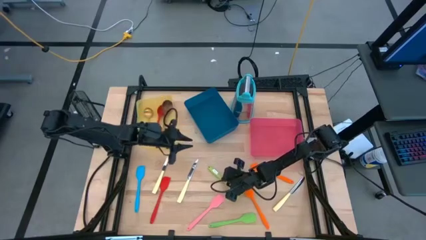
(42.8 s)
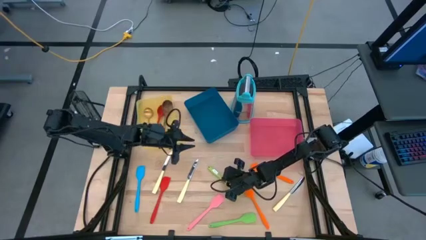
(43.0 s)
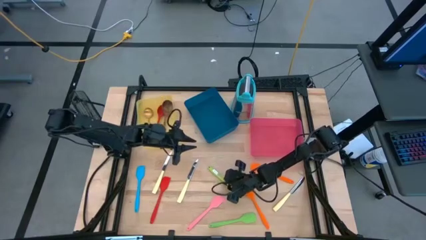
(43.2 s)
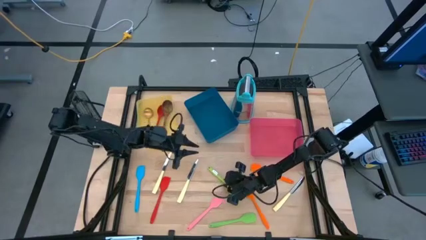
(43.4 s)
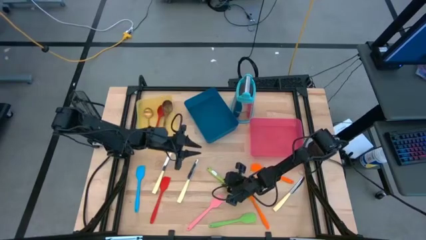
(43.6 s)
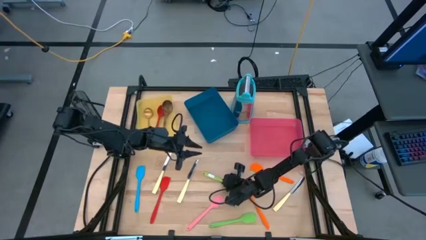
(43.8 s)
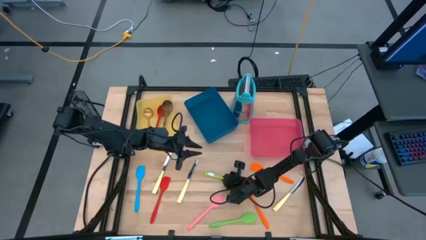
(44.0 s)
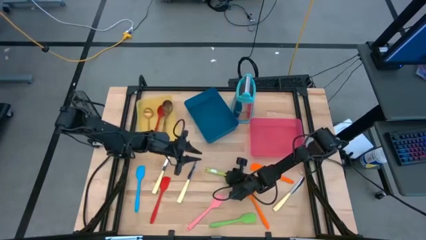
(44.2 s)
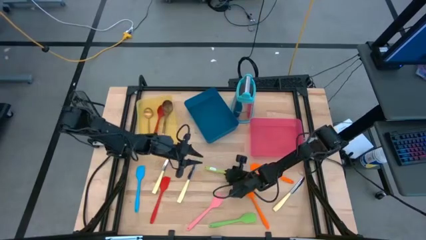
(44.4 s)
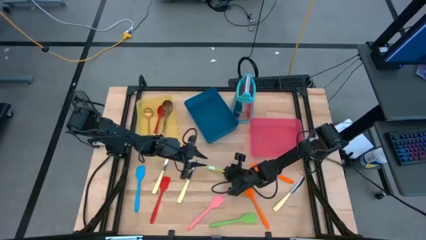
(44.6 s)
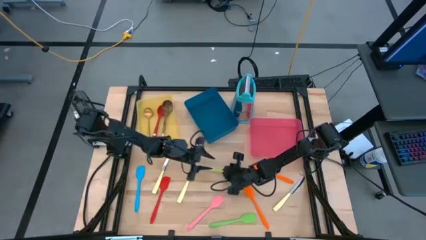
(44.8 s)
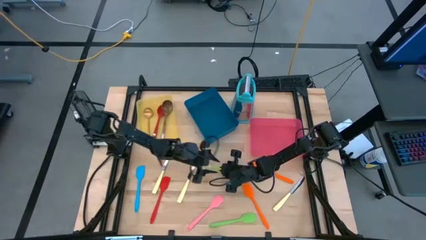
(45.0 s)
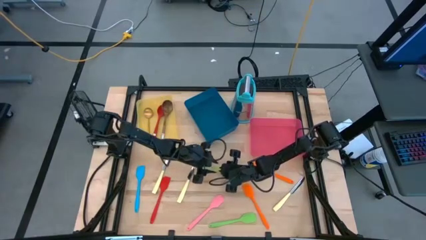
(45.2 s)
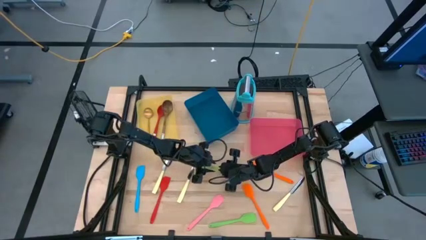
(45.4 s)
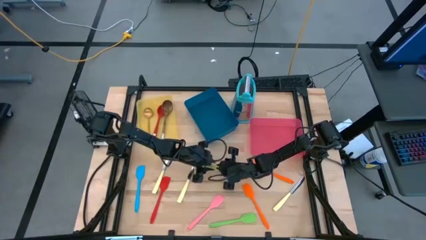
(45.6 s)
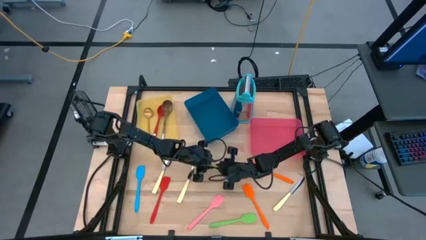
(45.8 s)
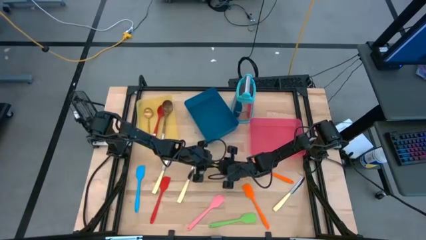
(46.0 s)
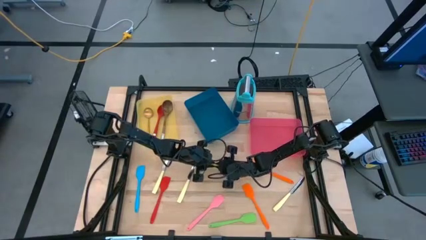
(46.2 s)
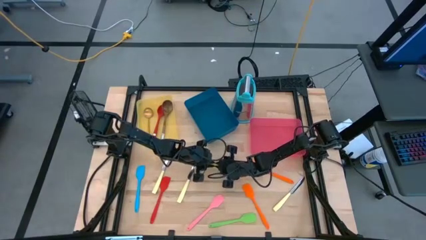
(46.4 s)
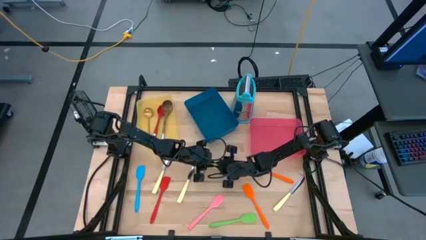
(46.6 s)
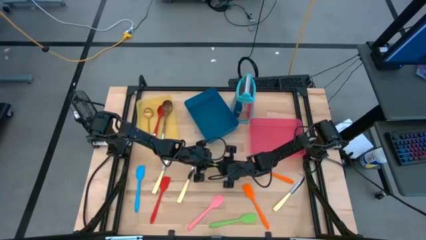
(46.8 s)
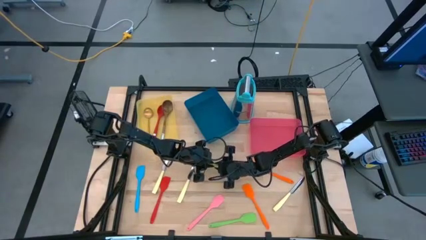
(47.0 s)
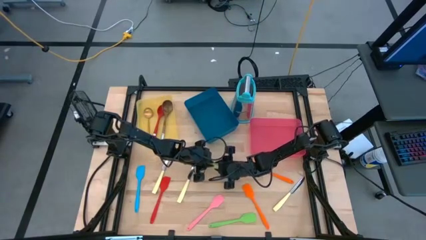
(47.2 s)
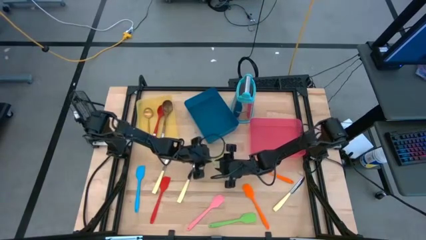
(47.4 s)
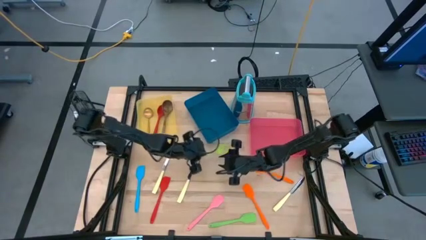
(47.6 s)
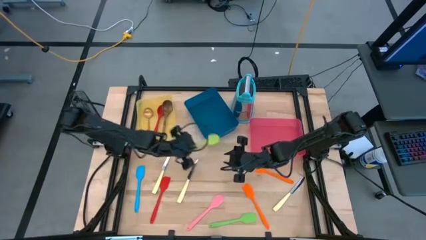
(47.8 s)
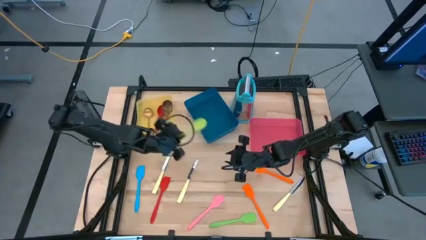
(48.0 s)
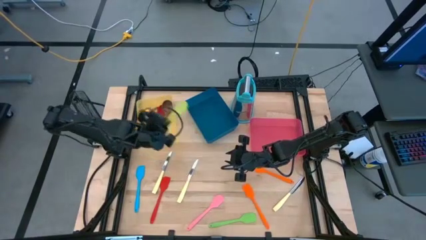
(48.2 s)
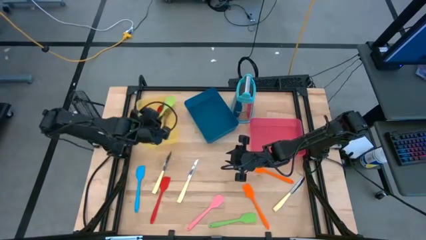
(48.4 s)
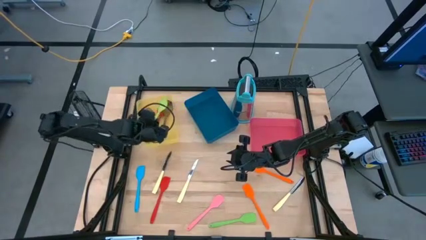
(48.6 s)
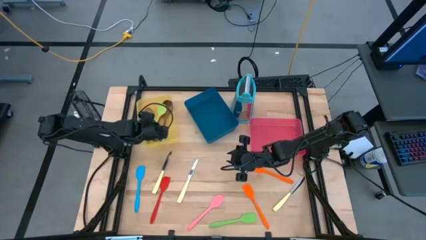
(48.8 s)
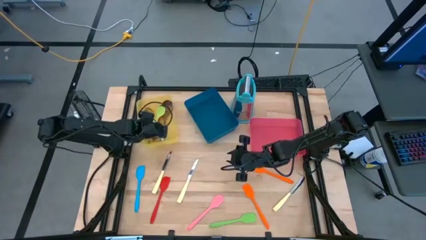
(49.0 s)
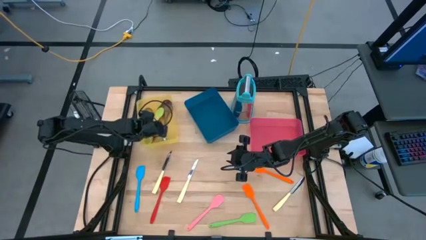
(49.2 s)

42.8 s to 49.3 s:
Task: Pick & Place Kitchen Items
Put the green serving spoon into the yellow bin

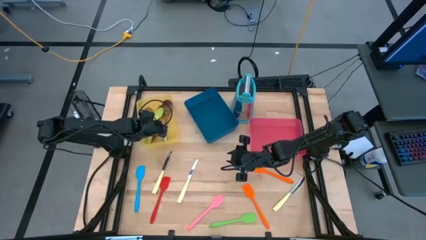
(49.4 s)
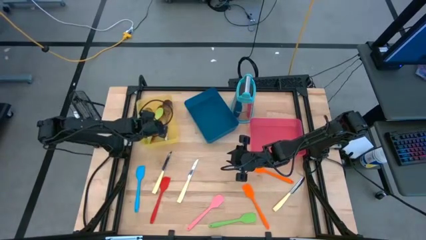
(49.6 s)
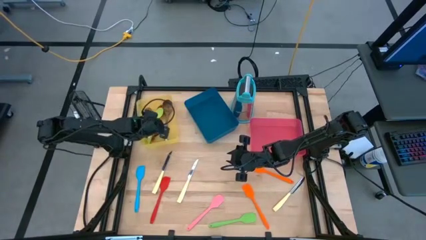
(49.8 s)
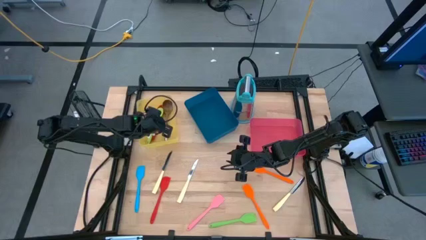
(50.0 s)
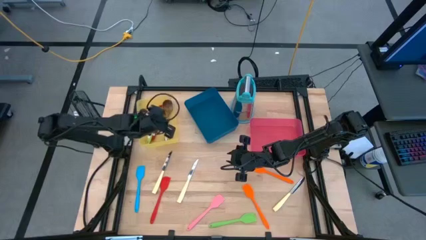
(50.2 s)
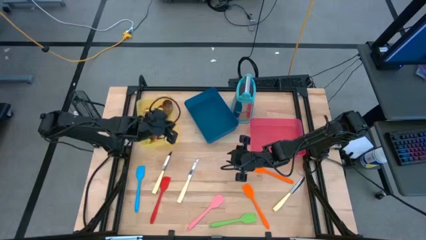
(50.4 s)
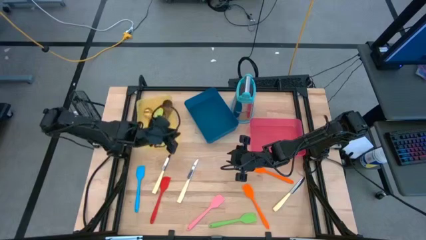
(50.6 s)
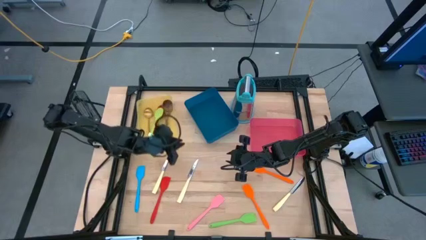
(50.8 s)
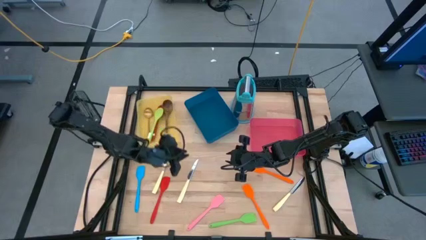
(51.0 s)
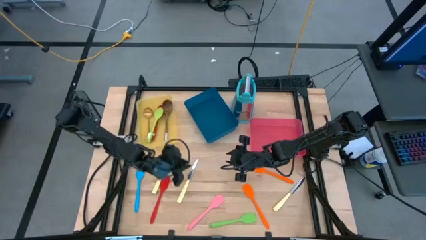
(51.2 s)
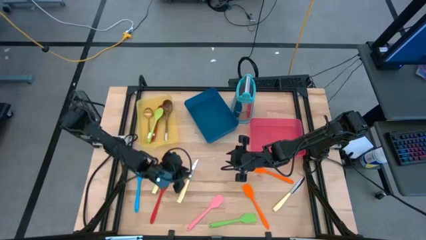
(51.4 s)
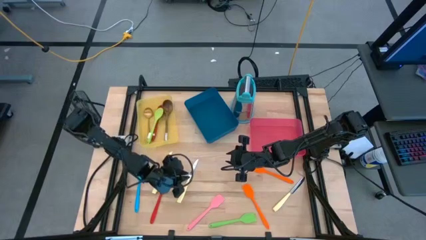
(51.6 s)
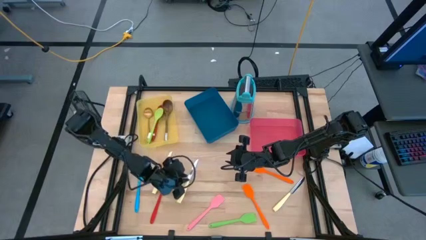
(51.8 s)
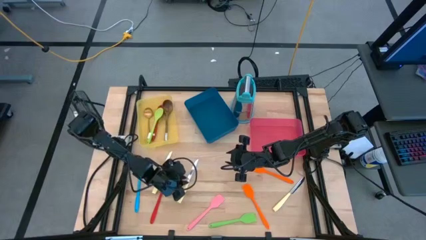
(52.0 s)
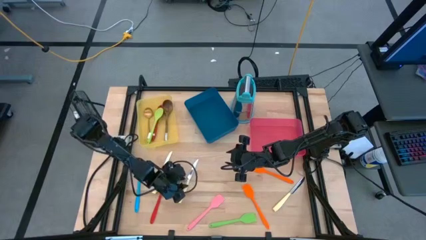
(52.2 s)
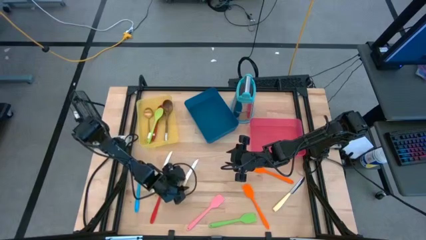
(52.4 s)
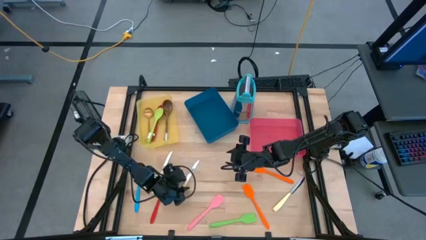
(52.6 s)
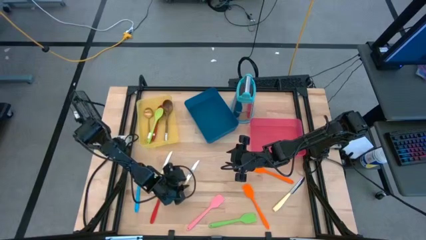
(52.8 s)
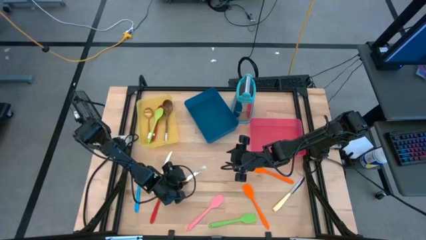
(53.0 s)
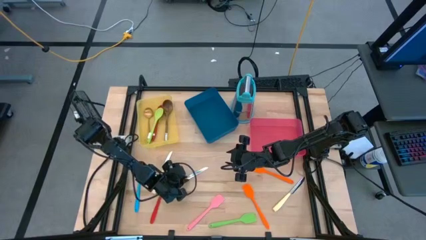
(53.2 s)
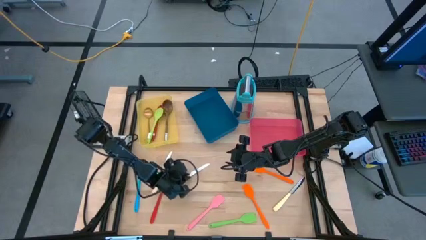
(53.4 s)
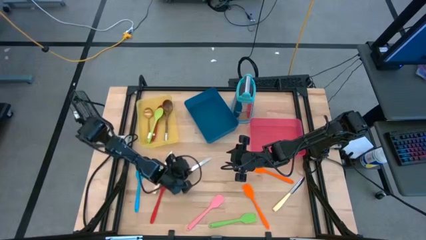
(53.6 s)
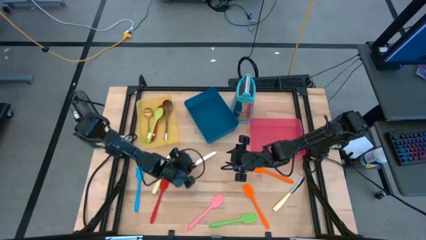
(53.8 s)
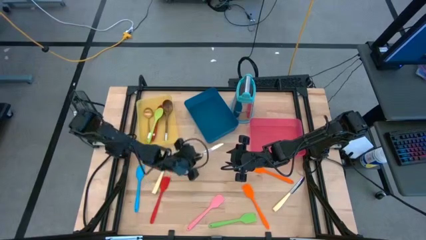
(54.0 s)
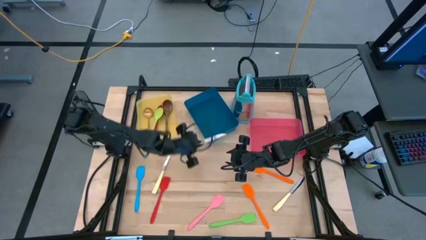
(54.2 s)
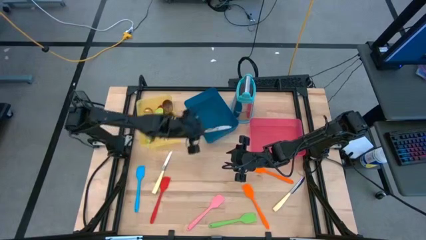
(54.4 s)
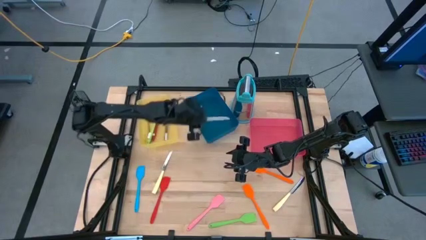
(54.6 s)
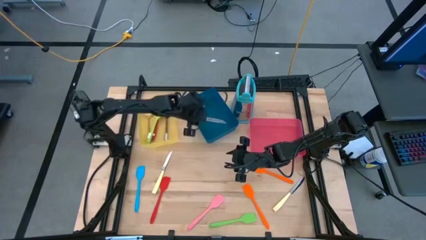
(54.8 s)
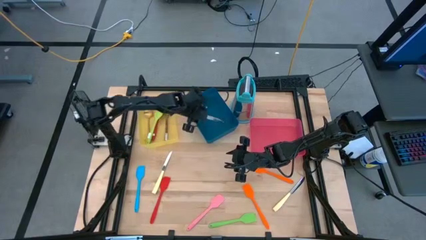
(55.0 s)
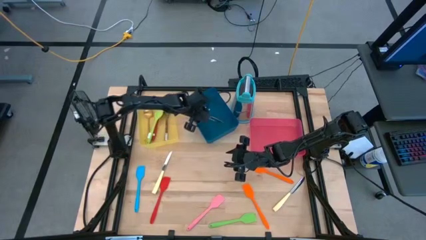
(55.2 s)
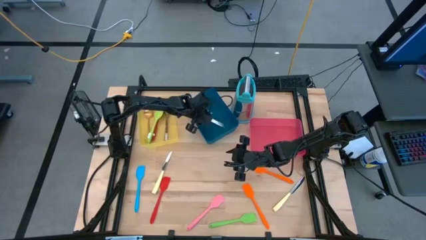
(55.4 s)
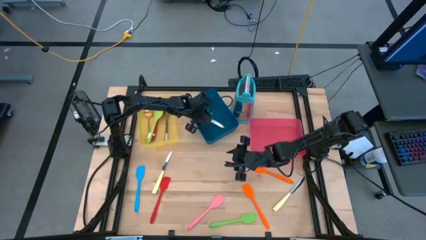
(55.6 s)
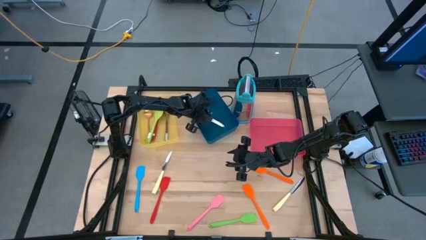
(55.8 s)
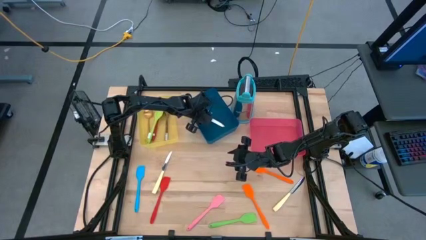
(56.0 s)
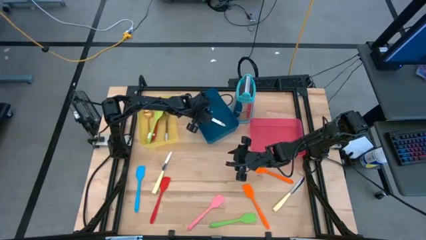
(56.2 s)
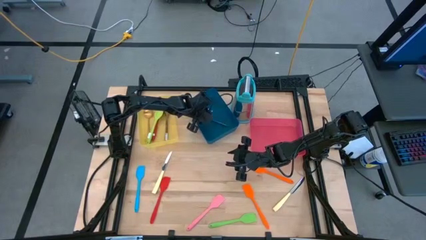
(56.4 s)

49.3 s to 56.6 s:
Put the middle yellow knife into the blue bin

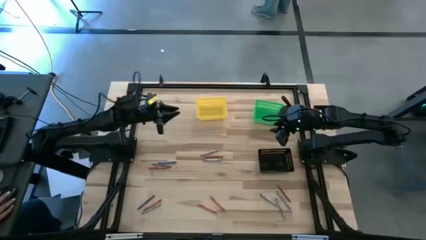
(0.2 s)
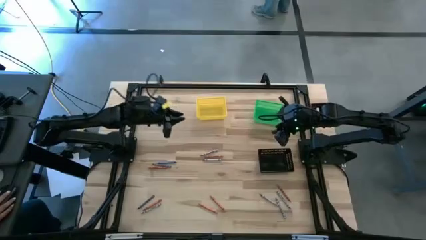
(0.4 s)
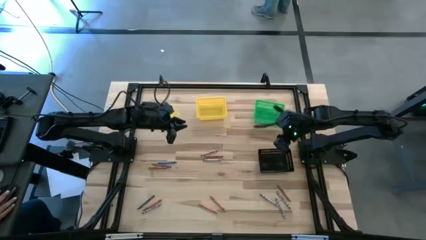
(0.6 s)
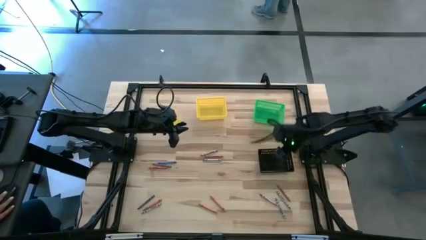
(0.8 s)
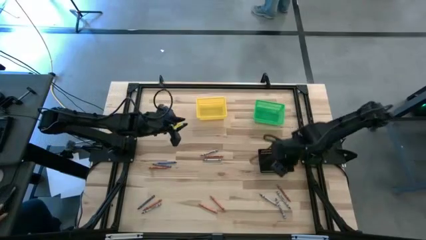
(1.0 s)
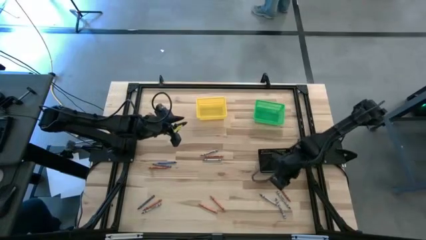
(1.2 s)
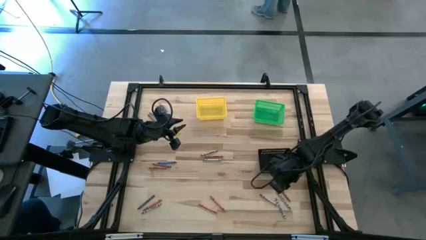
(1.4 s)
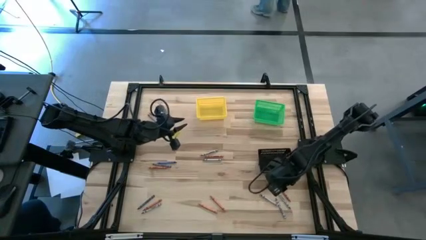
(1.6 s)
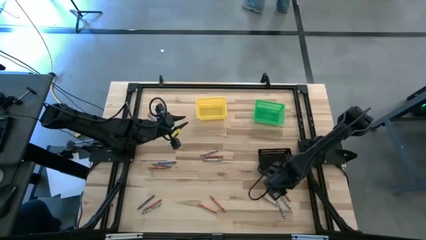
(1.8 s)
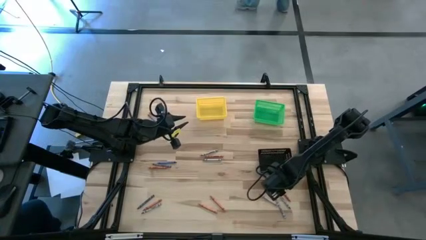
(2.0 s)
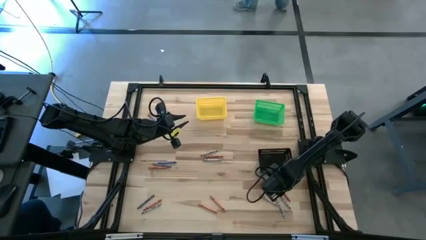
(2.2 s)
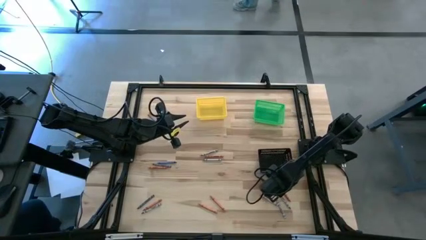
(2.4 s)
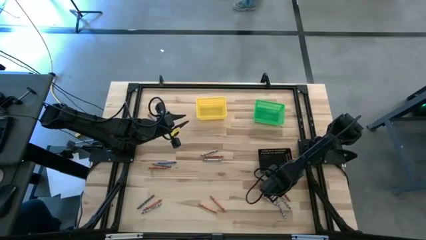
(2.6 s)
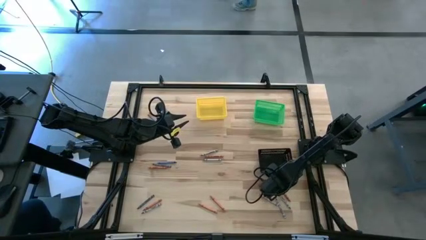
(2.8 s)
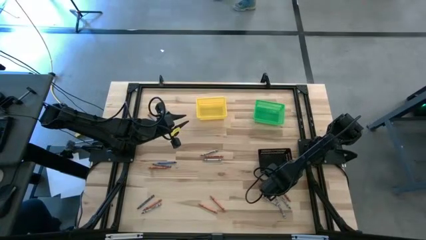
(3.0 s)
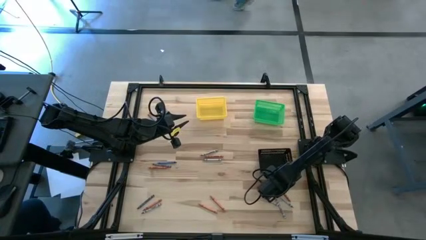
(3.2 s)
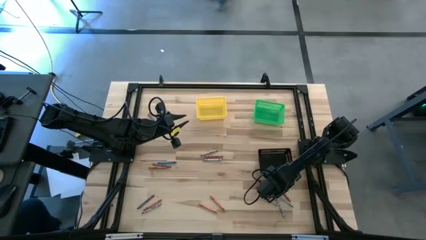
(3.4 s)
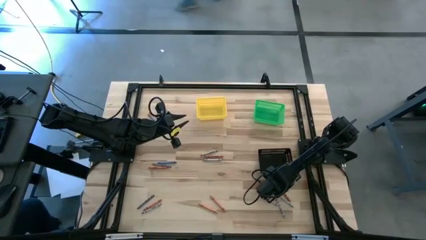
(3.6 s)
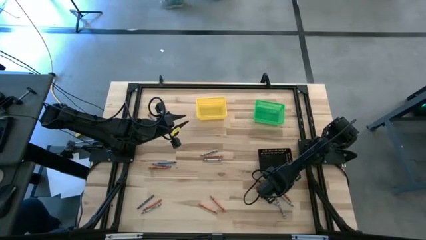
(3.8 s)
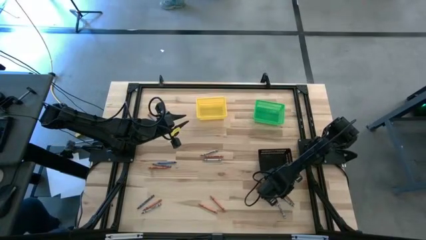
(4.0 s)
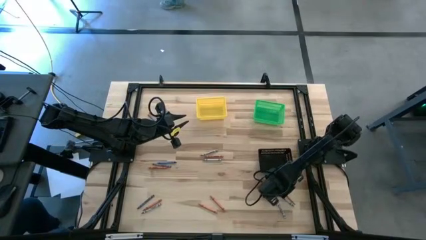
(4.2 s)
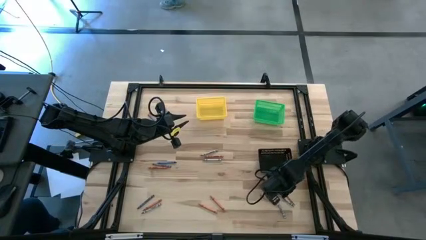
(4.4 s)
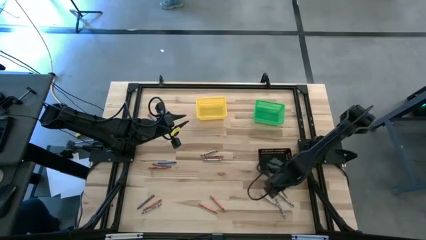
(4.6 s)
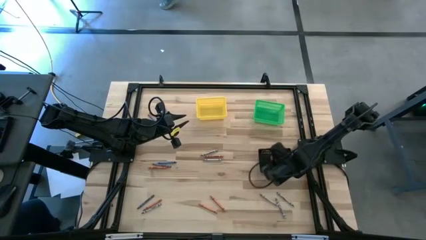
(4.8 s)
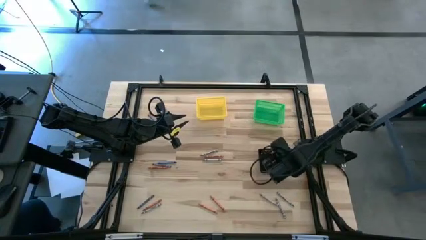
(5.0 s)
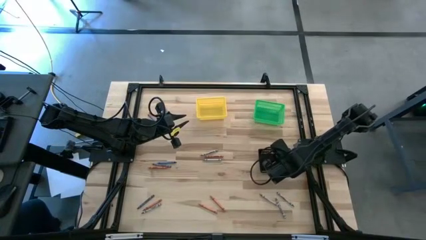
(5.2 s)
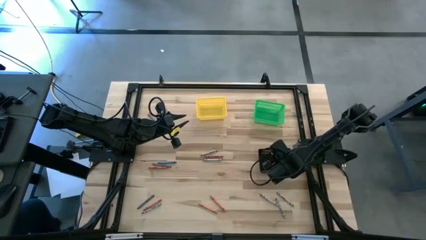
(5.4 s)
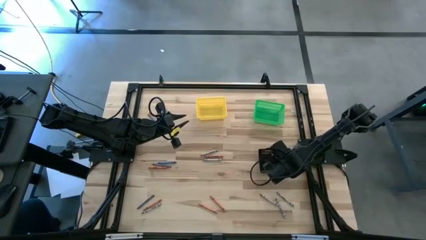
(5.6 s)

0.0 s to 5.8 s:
Task: Sort crayons
Put the orange crayon into the black basket
